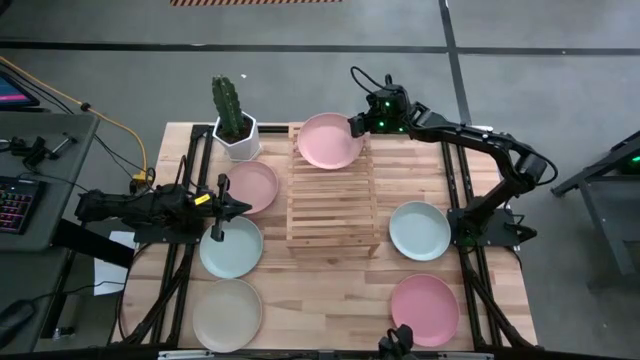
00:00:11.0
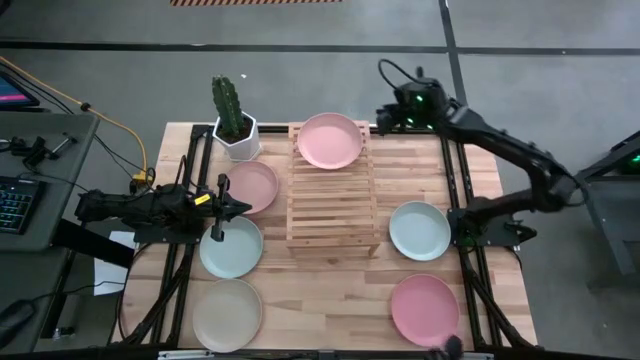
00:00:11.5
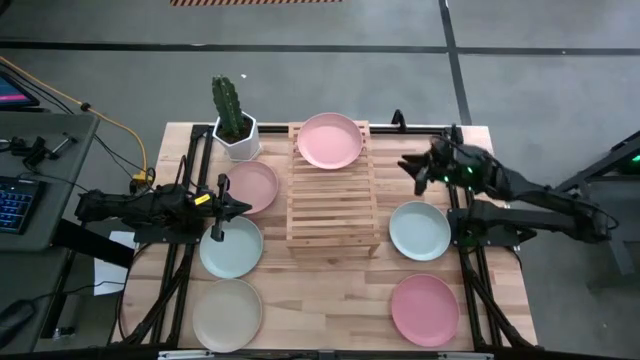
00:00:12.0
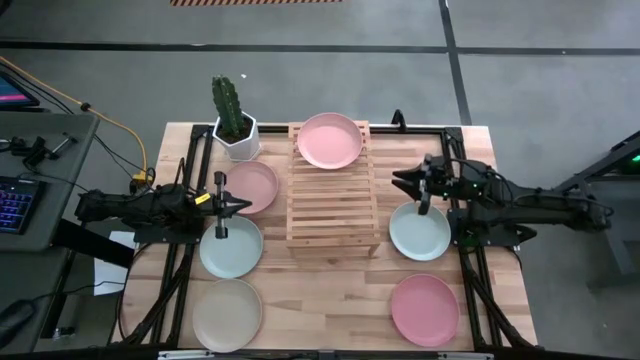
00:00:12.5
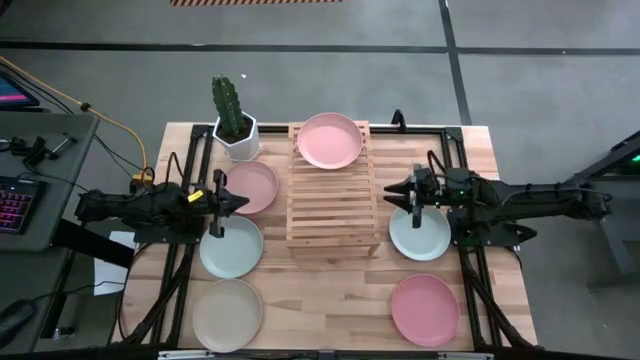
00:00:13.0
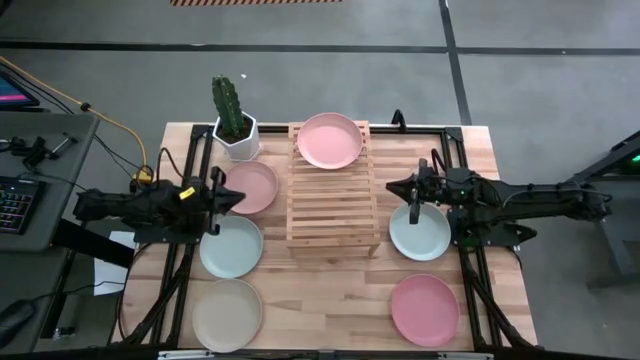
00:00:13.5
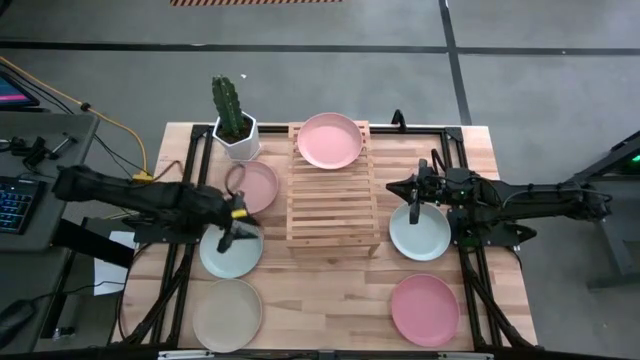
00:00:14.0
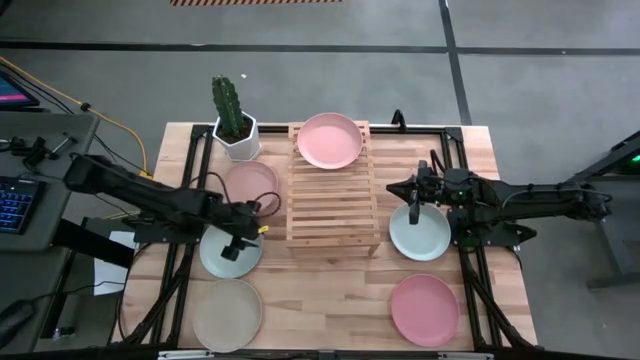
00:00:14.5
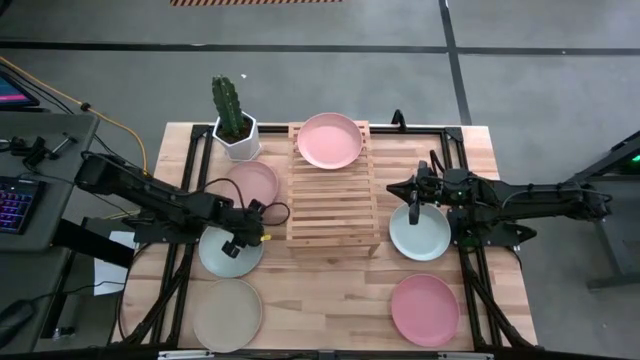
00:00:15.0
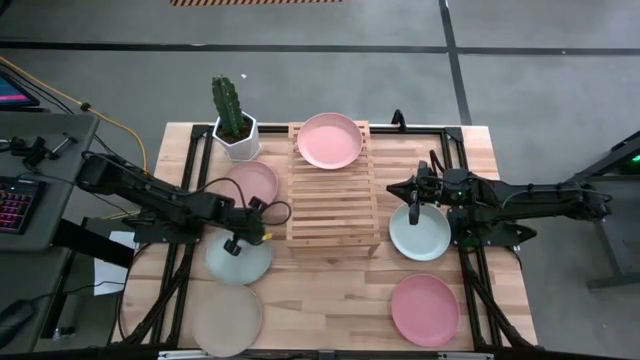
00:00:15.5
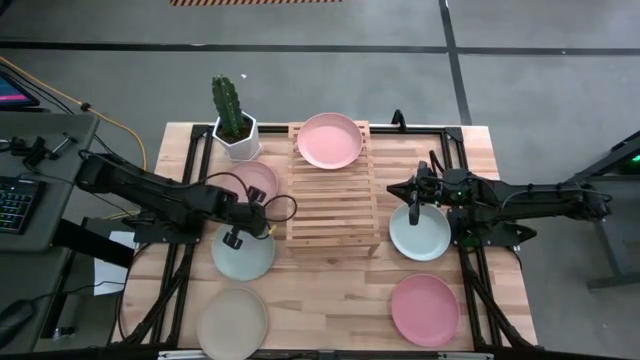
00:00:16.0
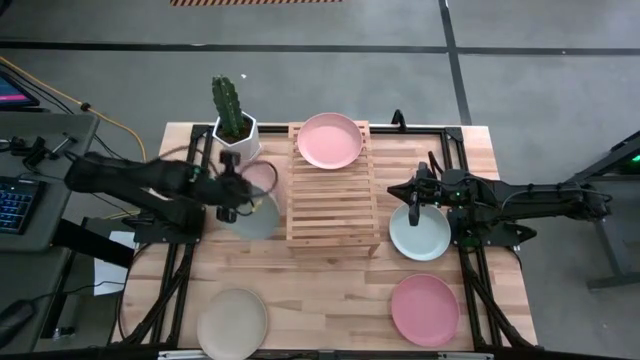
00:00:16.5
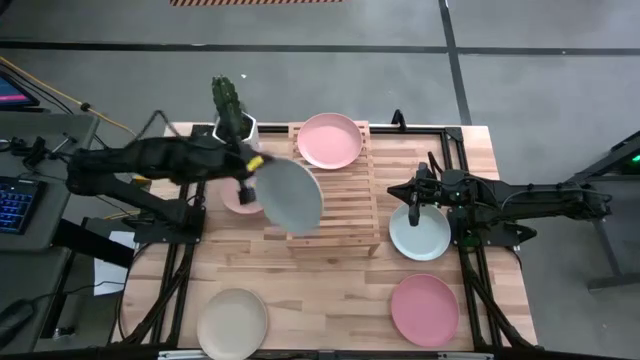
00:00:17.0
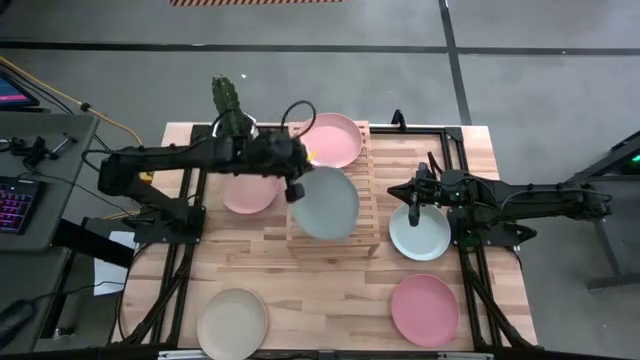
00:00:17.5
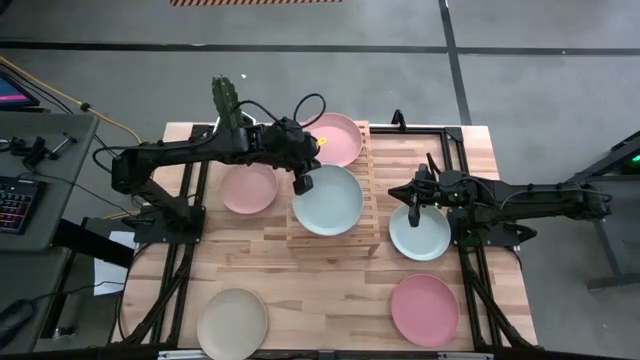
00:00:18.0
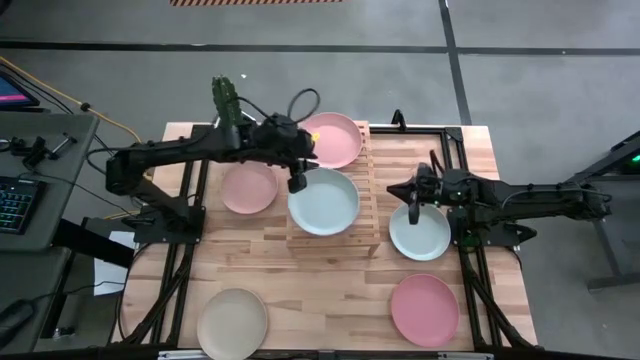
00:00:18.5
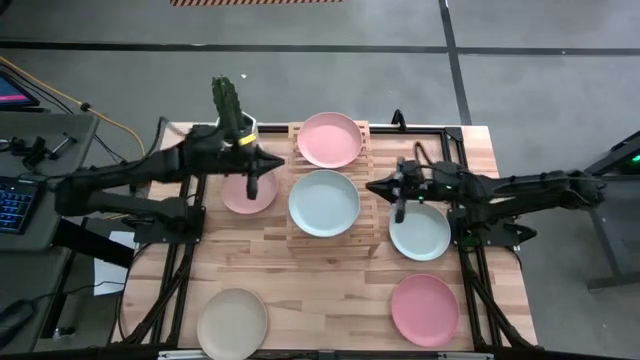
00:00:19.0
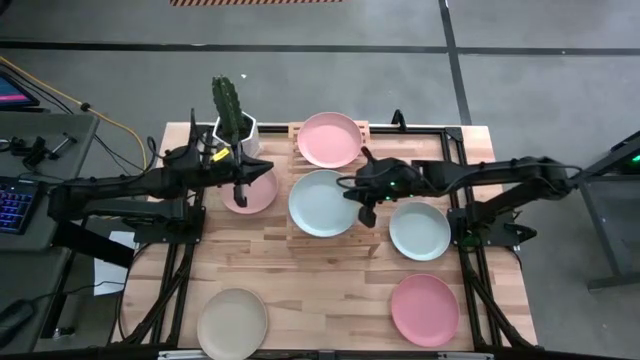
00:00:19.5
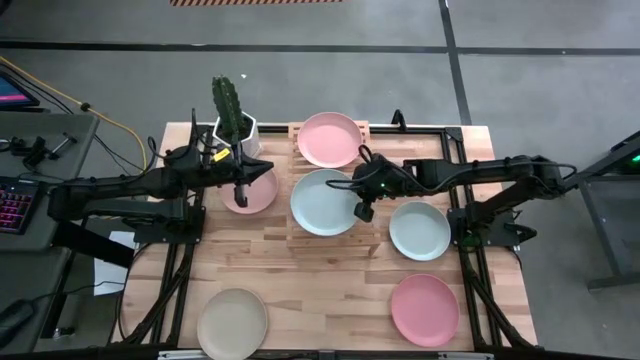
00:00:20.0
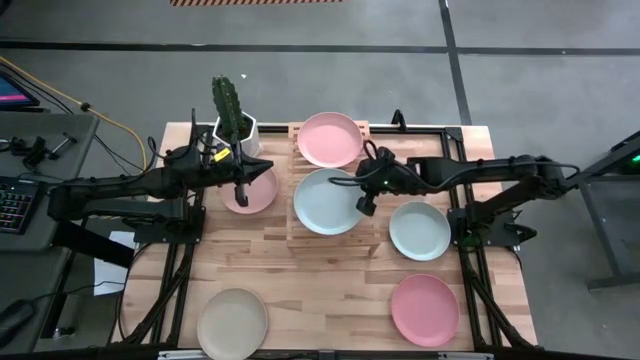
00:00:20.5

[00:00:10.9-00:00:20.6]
Task: Place and stack plates onto a shelf
Put the left blue plate on the shelf

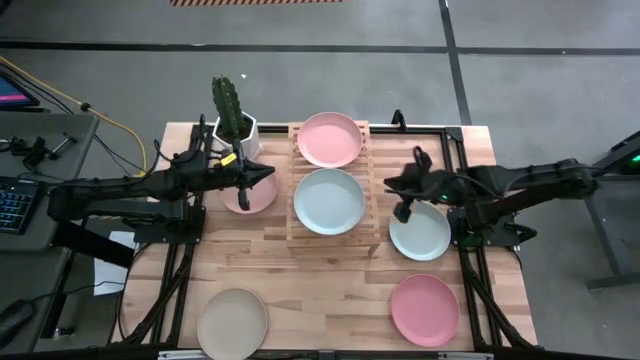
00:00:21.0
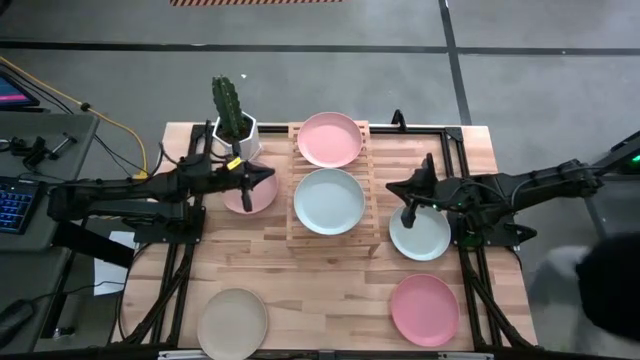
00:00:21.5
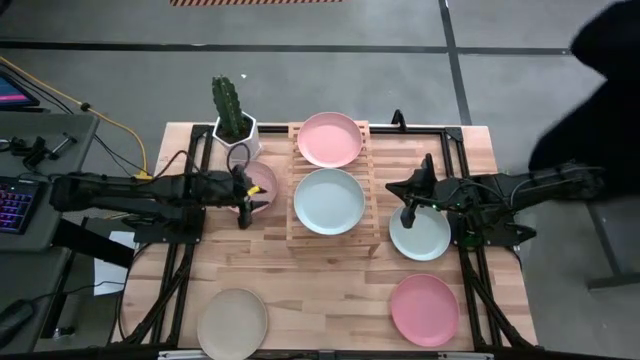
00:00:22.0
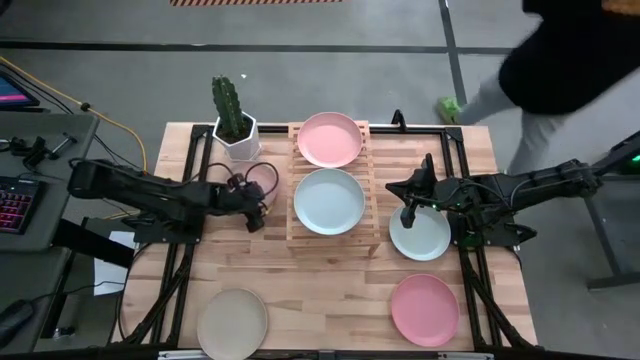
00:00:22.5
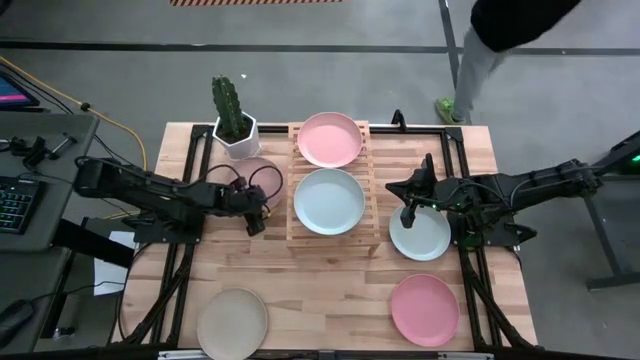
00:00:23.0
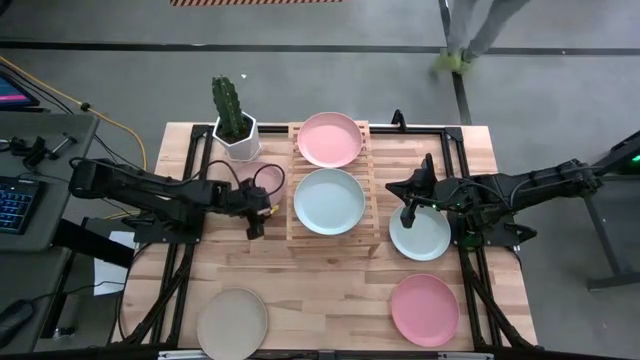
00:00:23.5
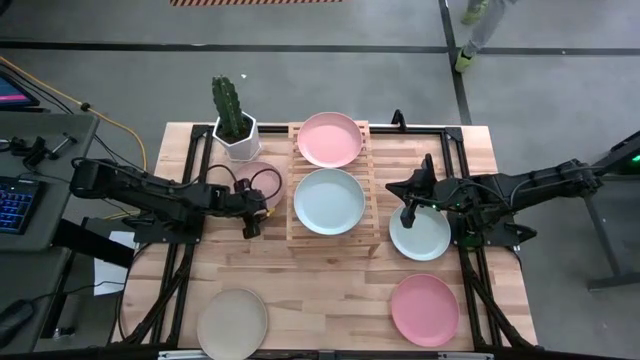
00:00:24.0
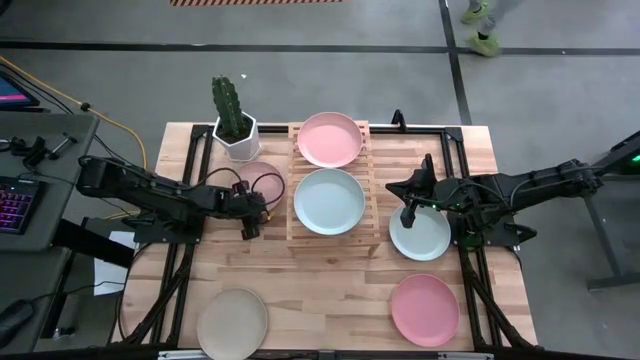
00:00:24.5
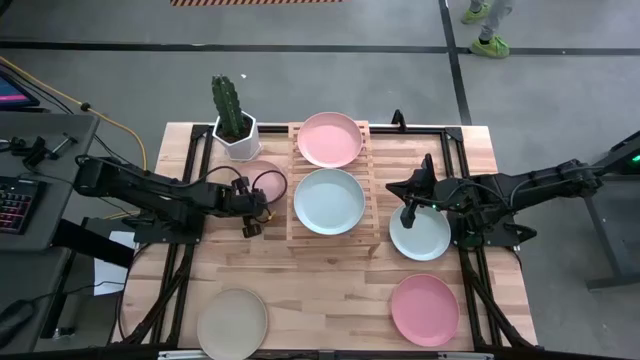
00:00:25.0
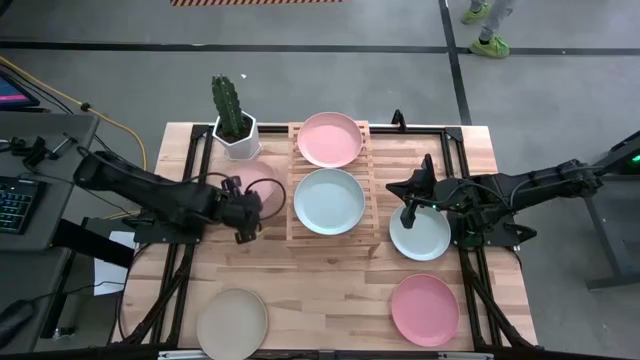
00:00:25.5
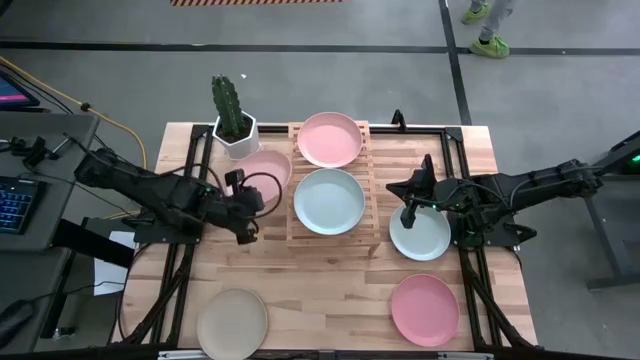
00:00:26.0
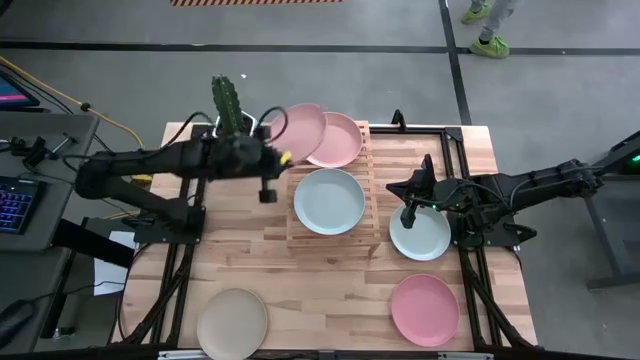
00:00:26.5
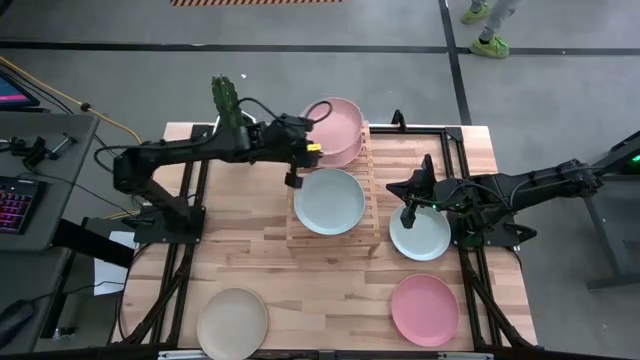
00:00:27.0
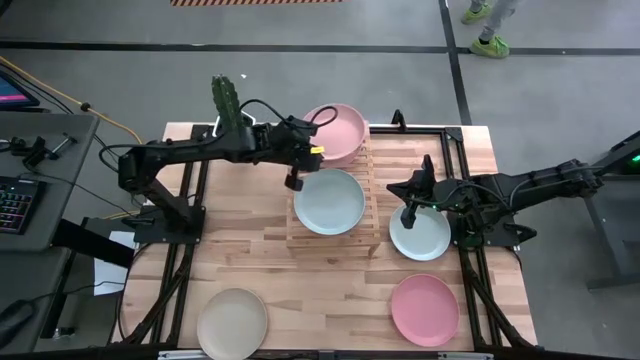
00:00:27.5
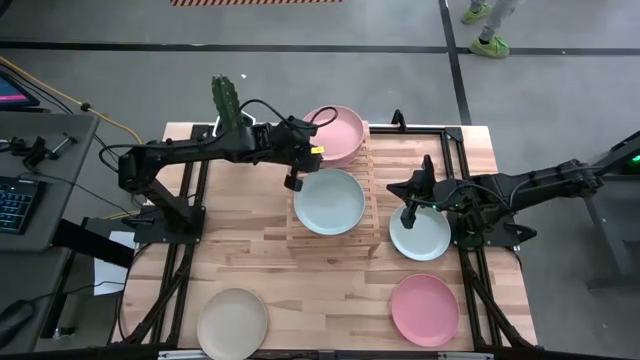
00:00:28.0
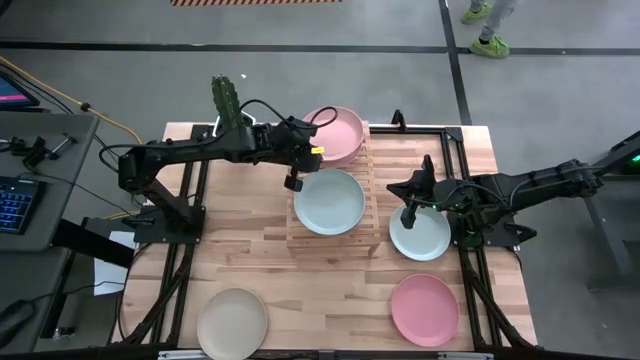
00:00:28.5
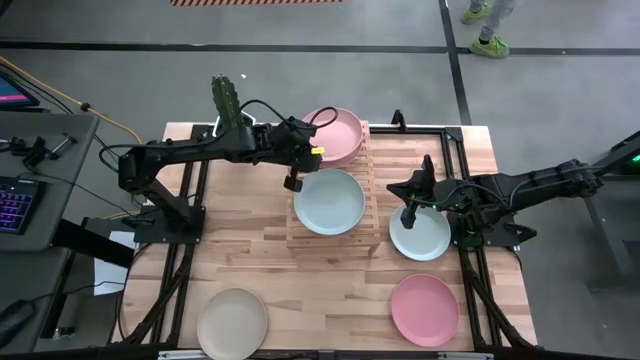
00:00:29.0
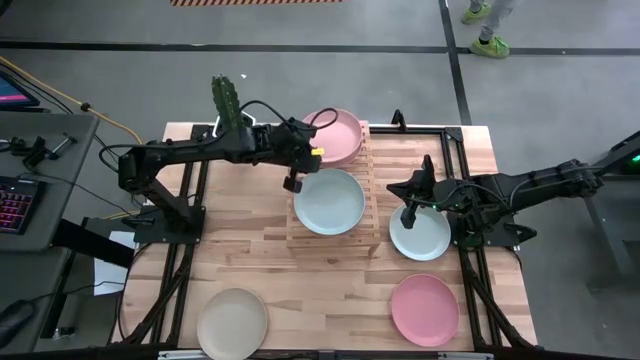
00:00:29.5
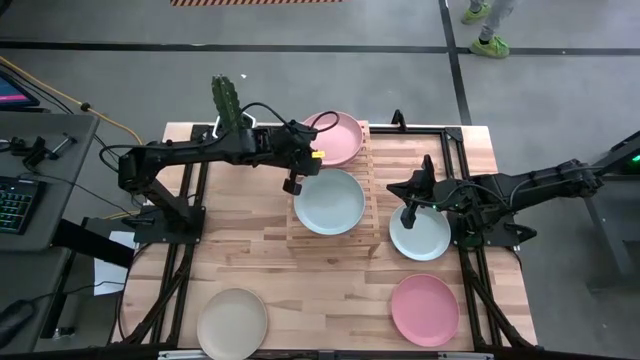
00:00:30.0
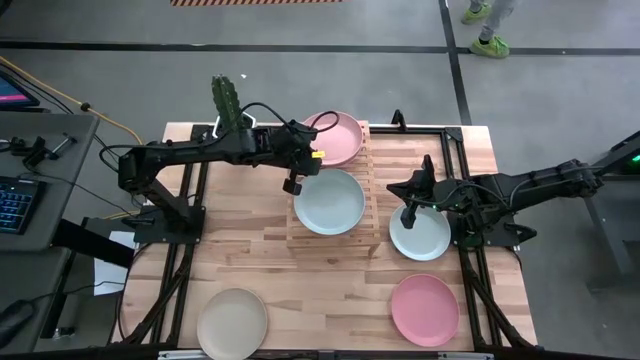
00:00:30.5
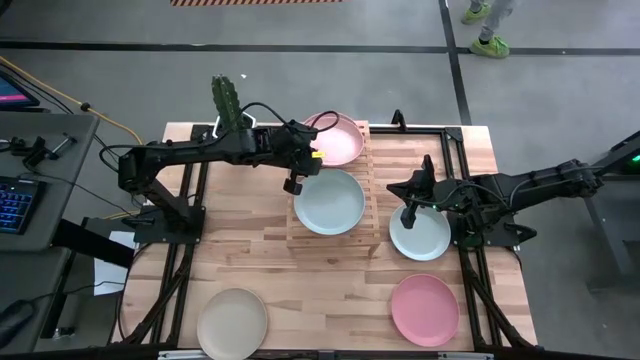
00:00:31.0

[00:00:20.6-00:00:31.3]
Stack the light pink plate on top of the light pink plate on the shelf
